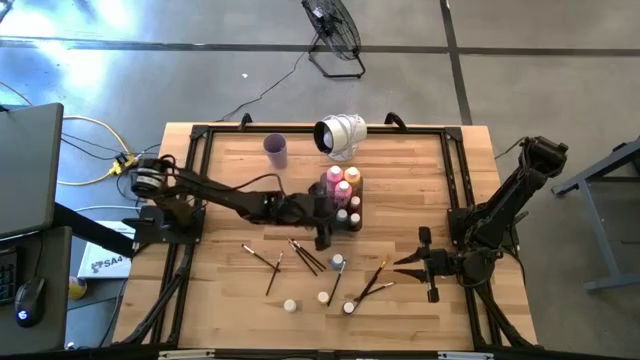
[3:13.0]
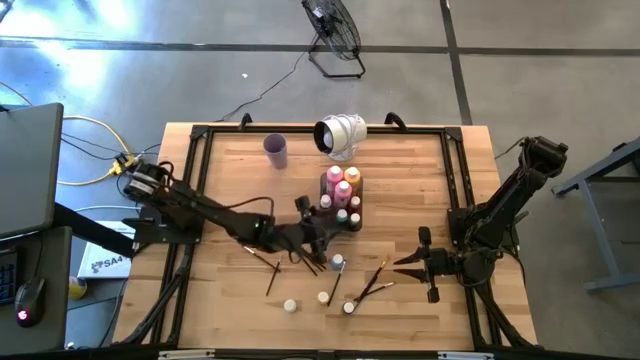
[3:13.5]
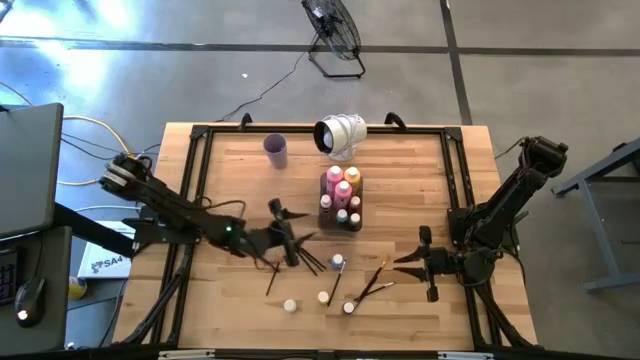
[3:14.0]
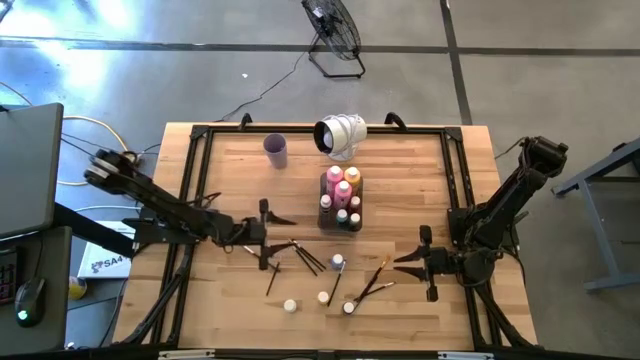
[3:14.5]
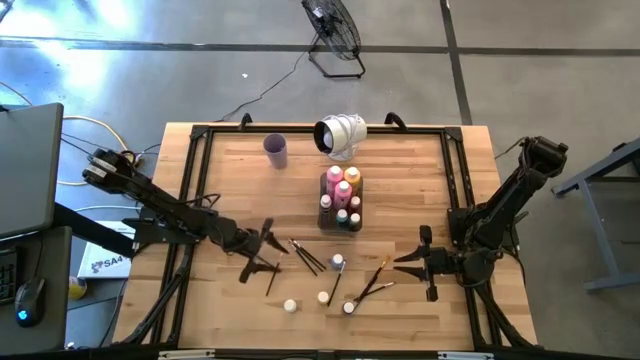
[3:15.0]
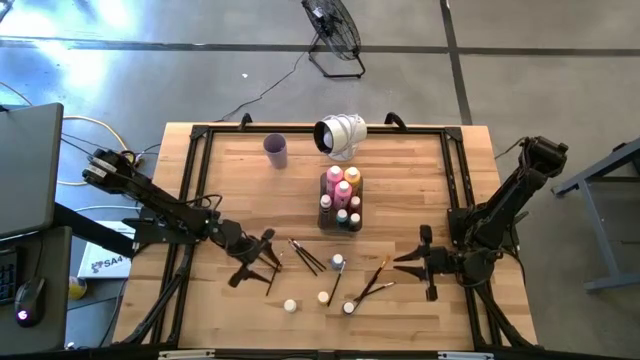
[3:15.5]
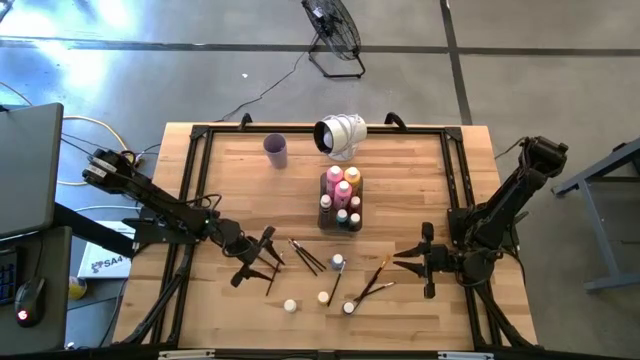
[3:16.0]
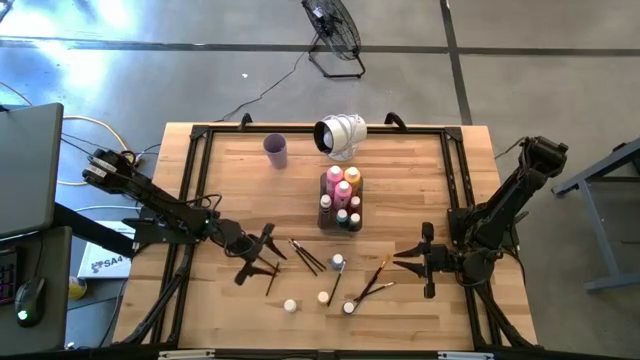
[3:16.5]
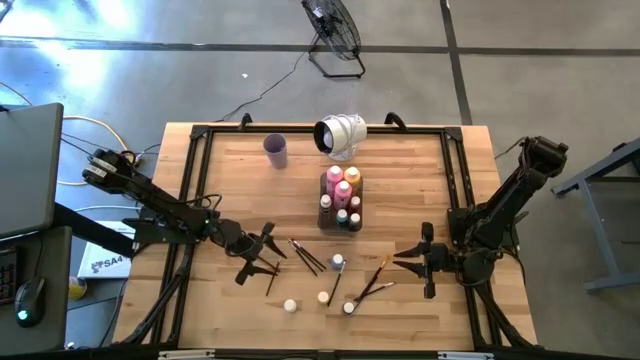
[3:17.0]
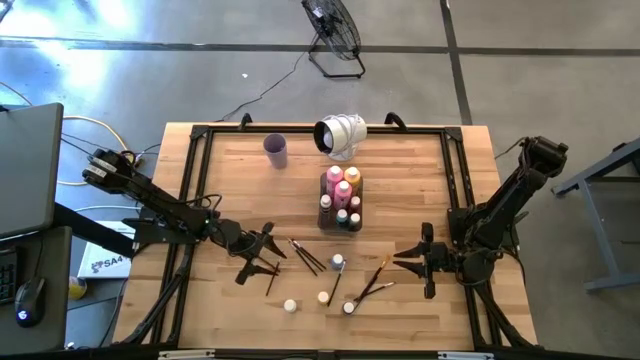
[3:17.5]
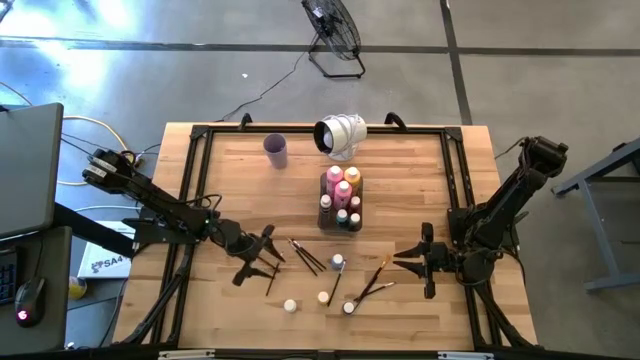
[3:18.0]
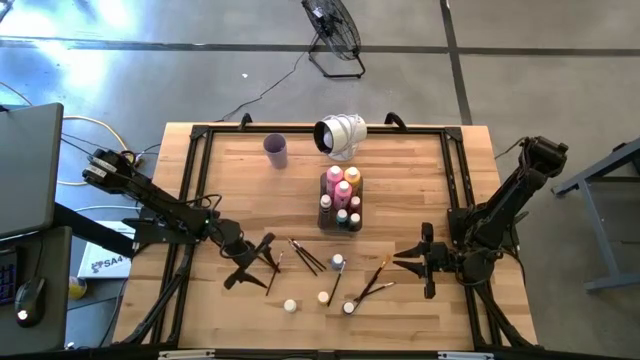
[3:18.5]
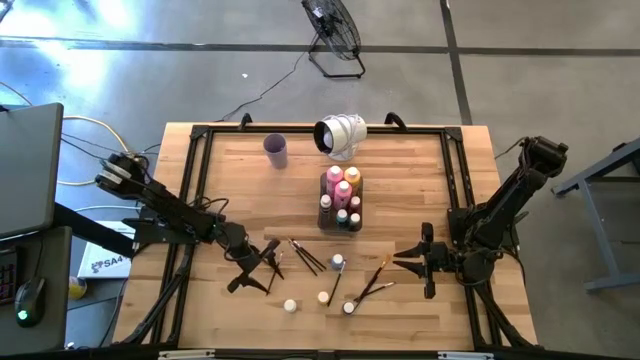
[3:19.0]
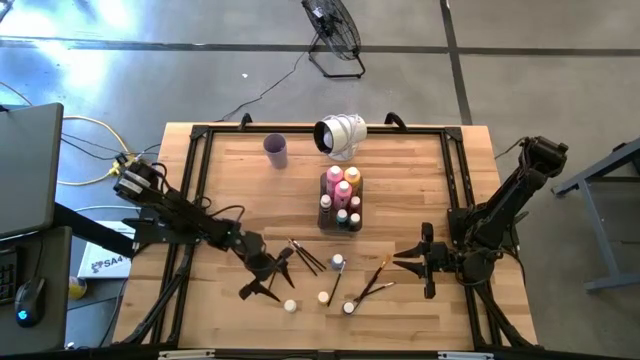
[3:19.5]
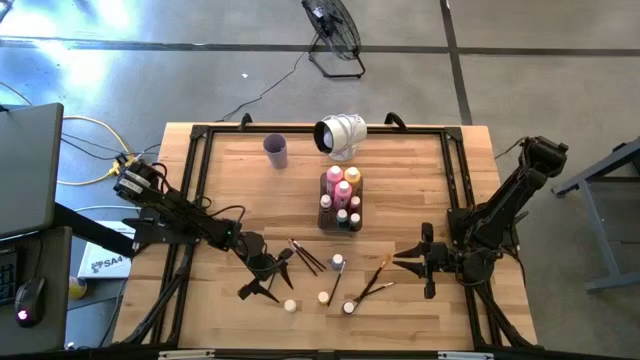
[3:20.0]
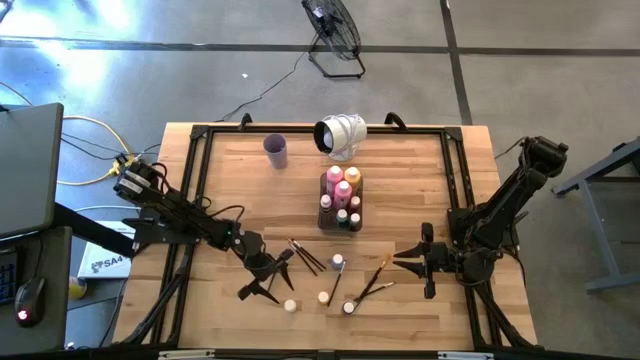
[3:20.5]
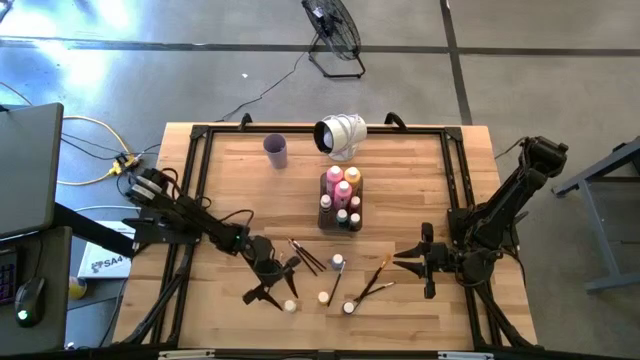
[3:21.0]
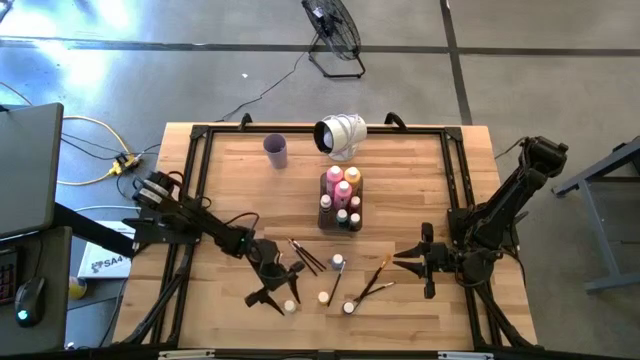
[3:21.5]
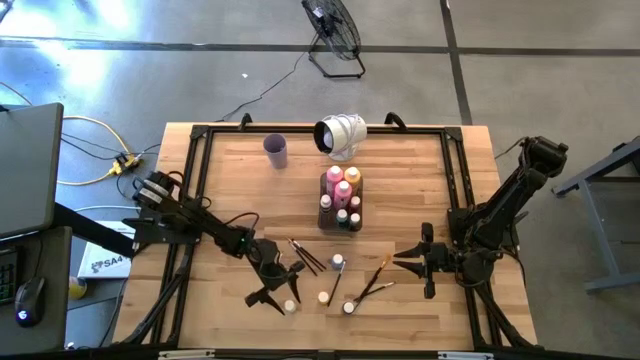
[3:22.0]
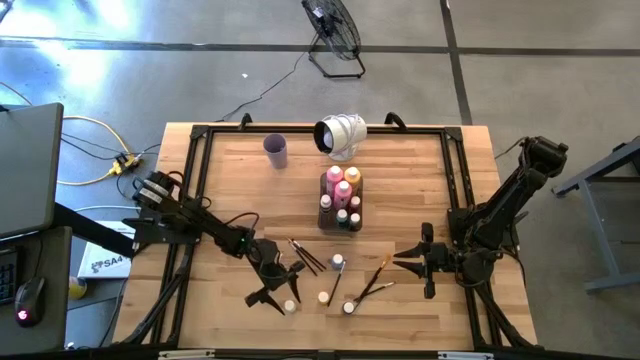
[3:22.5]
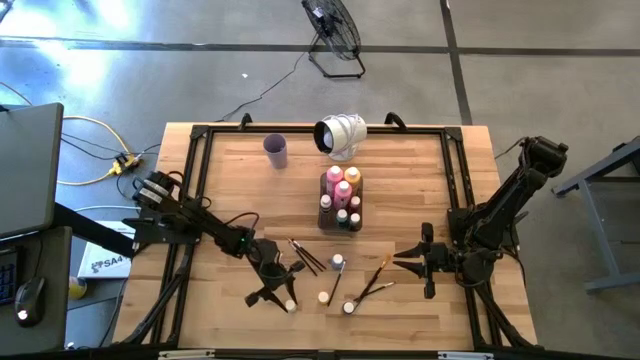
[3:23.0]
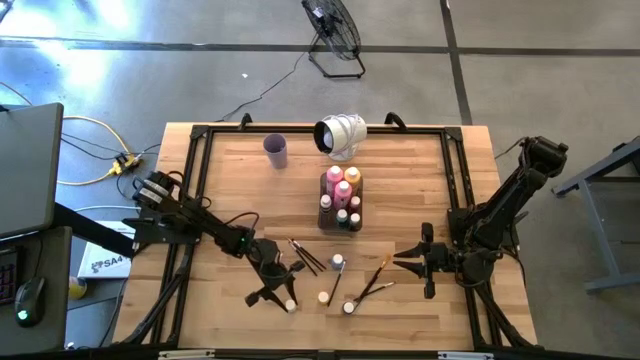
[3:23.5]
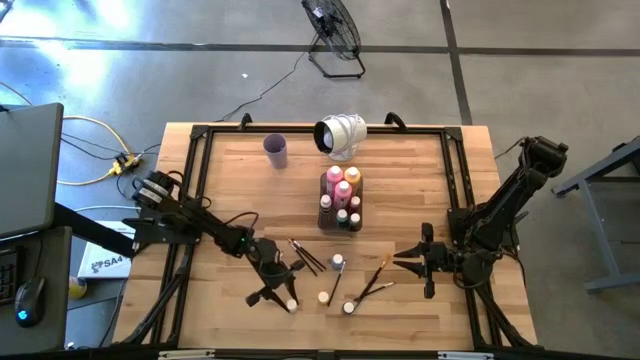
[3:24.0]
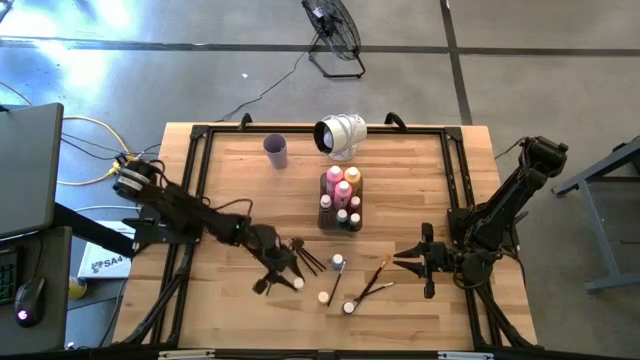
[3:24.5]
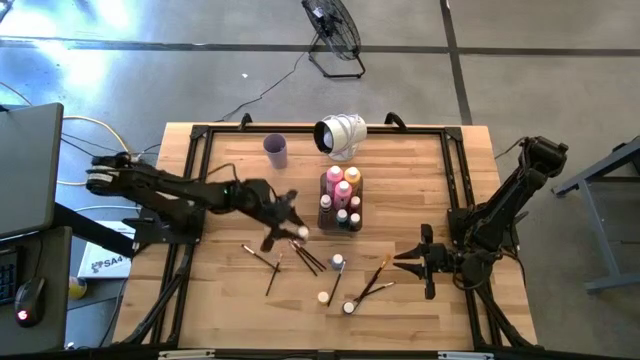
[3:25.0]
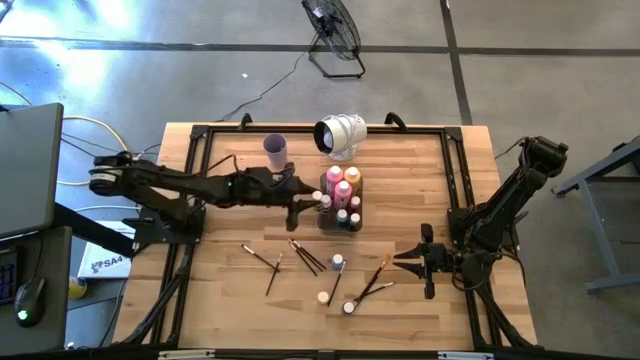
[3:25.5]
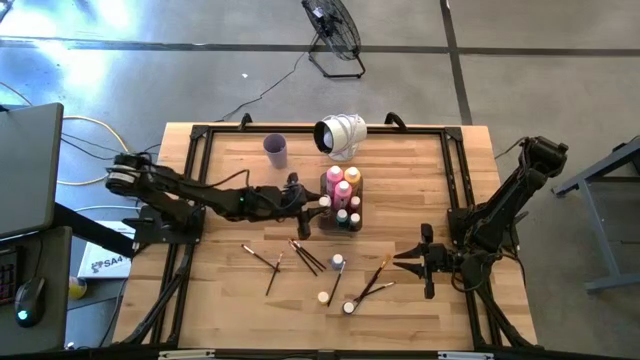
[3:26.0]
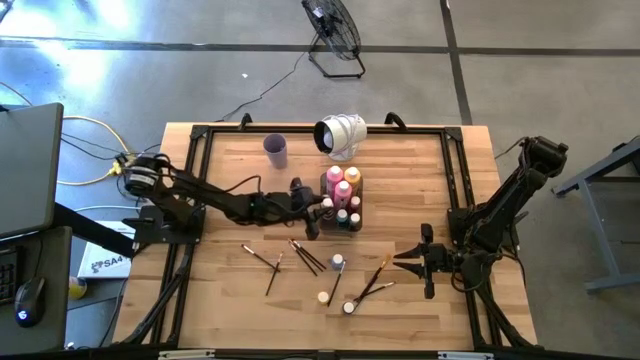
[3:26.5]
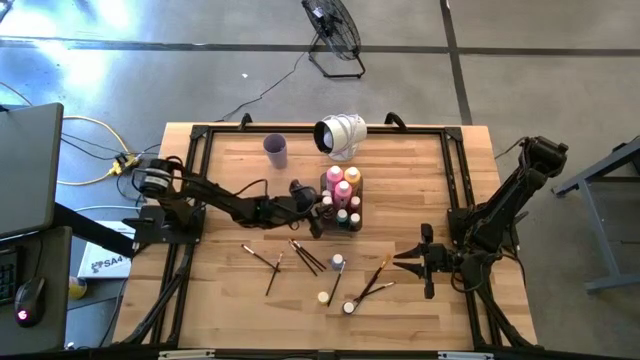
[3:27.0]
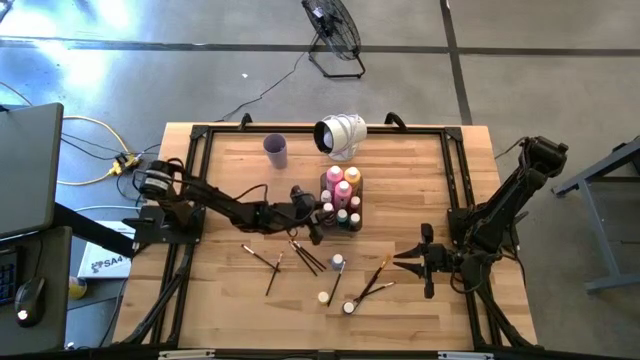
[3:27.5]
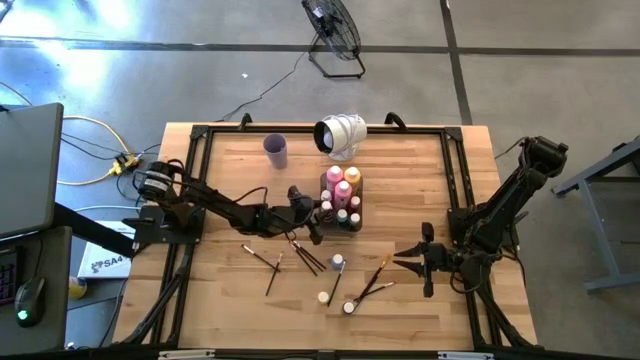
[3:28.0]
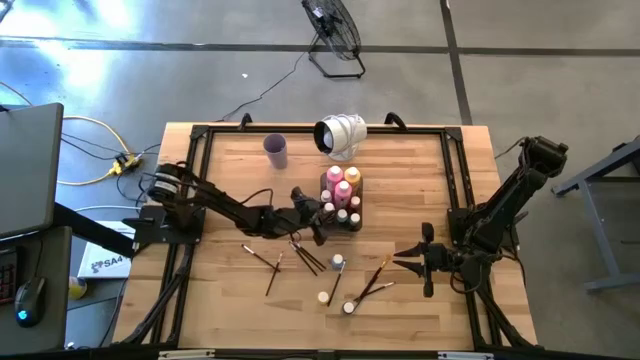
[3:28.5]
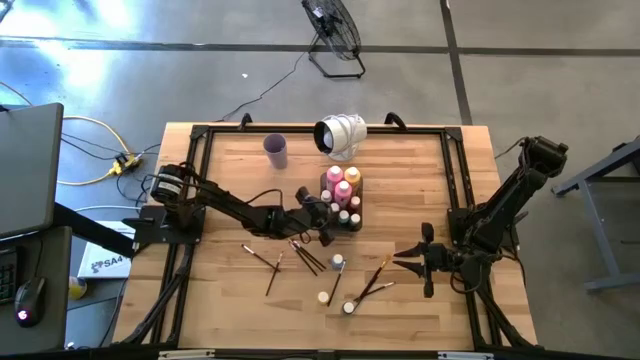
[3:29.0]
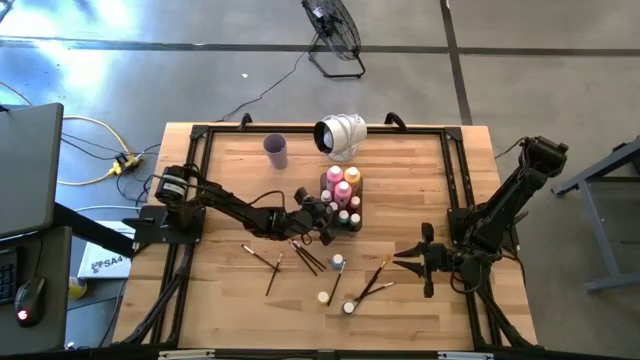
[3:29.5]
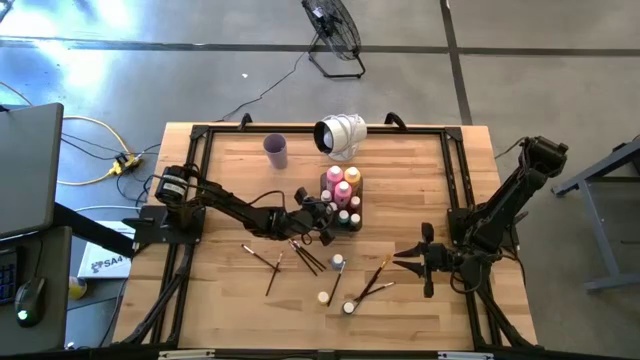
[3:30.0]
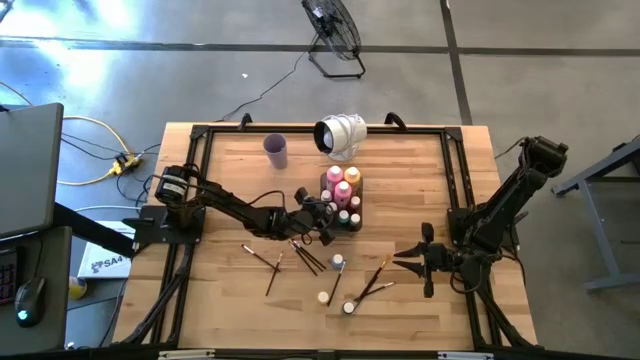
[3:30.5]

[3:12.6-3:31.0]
Task: Pick & Place Paint Supplies
Put the white paint bottle into the black bin

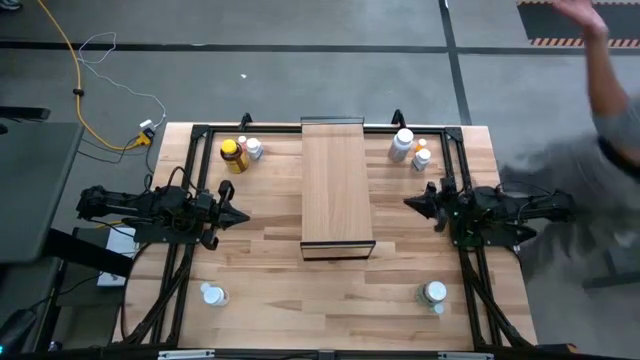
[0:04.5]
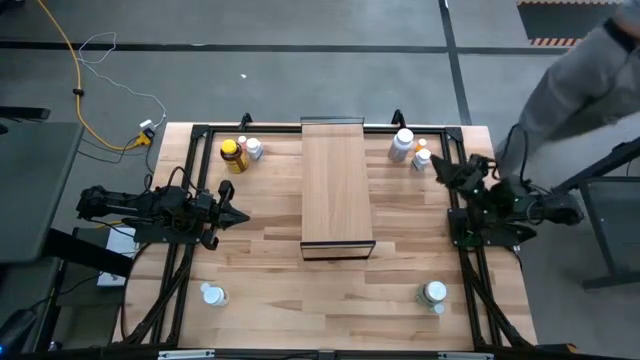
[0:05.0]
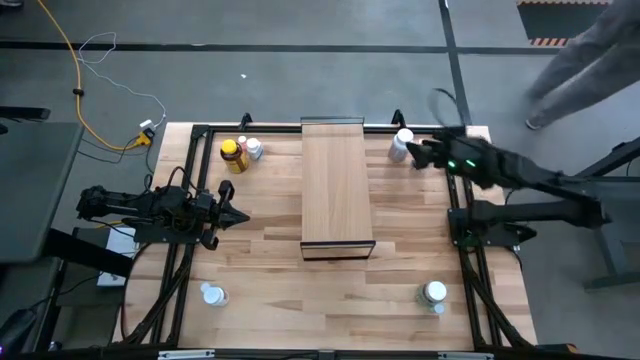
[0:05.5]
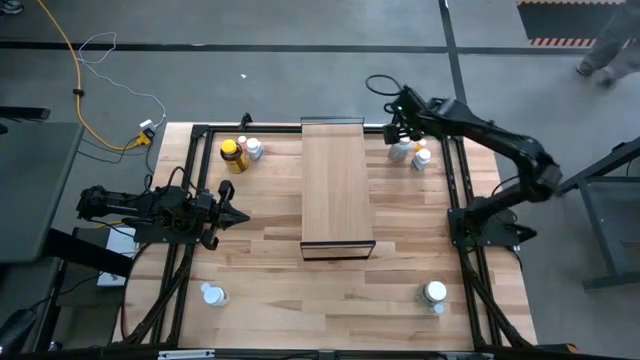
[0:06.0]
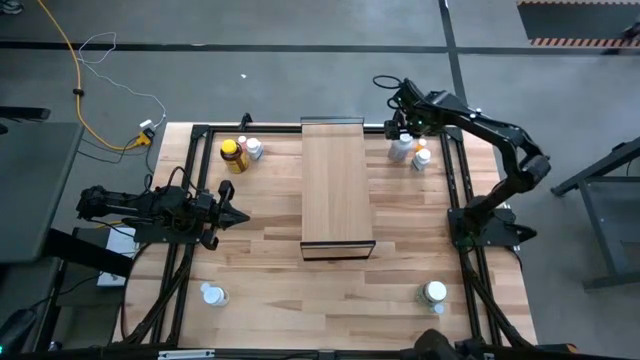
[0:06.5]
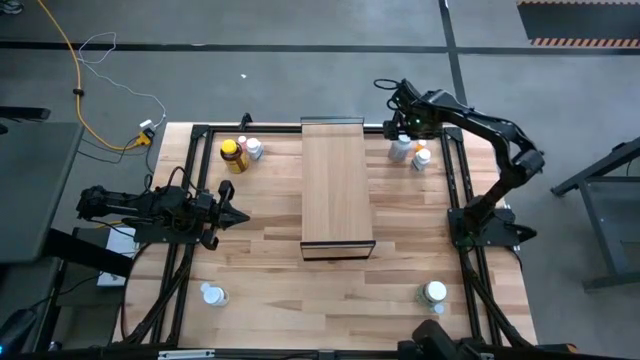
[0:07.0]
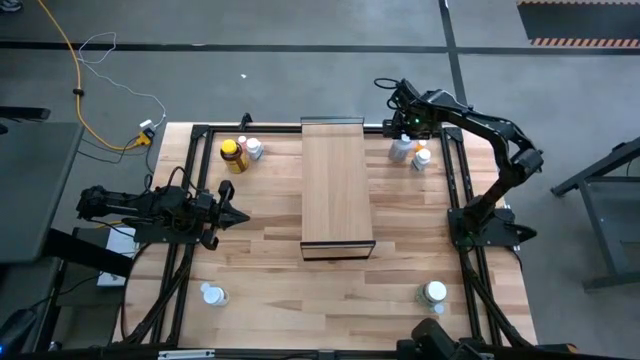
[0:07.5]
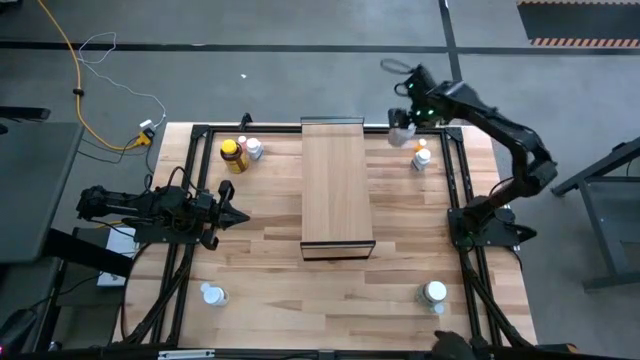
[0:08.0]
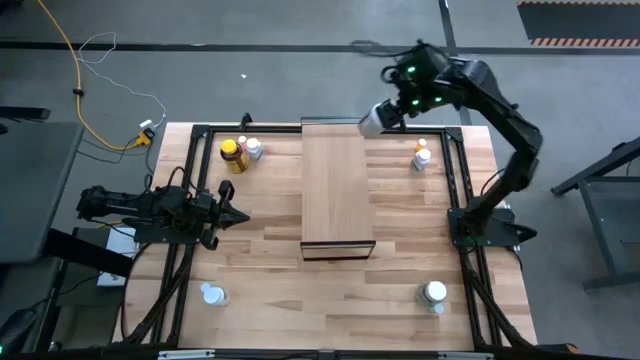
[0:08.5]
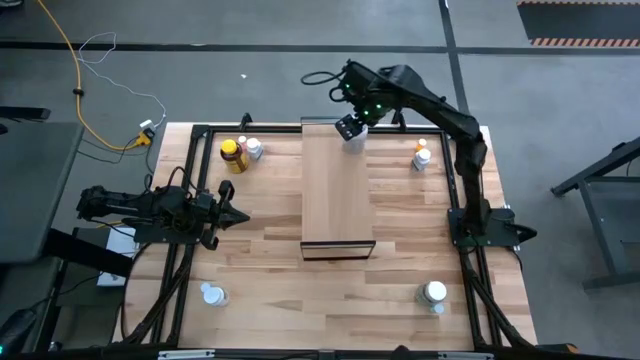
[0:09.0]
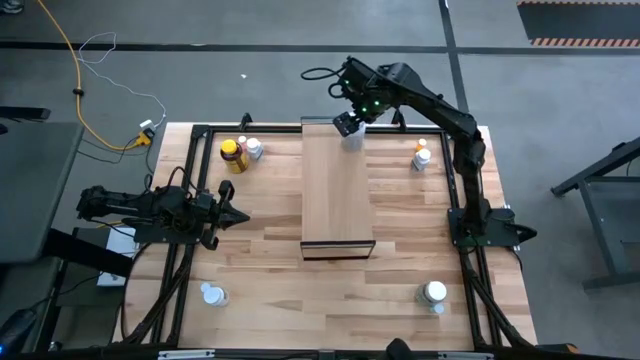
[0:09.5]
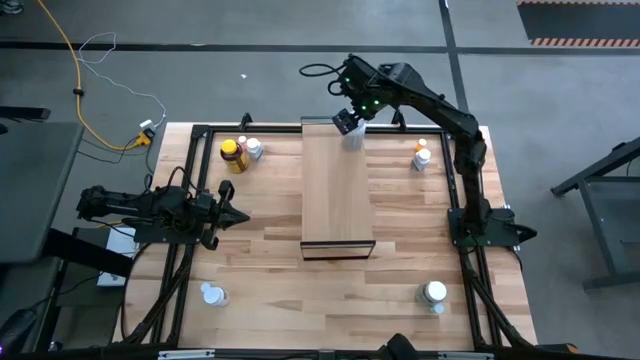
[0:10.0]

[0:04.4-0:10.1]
Task: Pick and place medicine bottles onto shelf by color
Put the white purple pill bottle on the shelf
